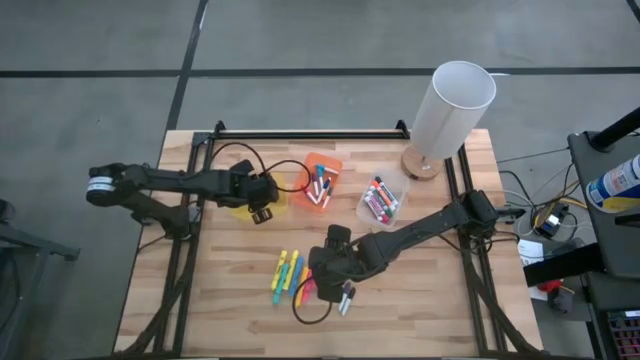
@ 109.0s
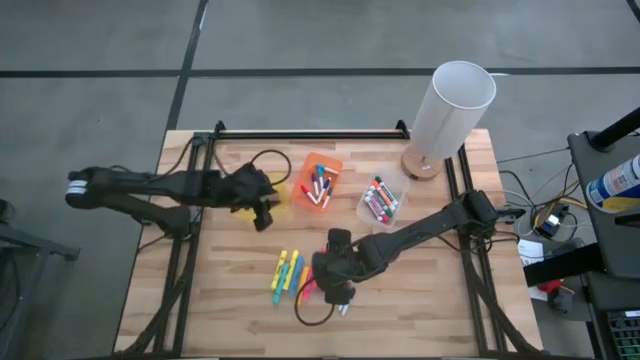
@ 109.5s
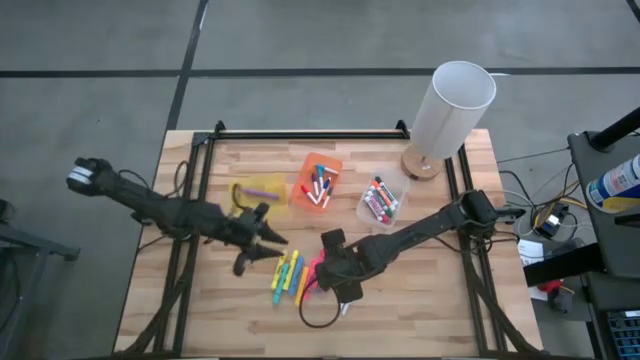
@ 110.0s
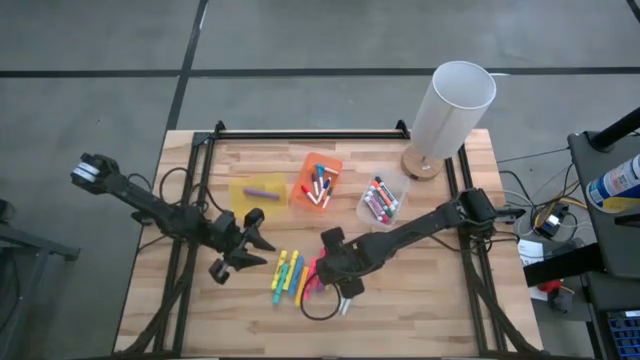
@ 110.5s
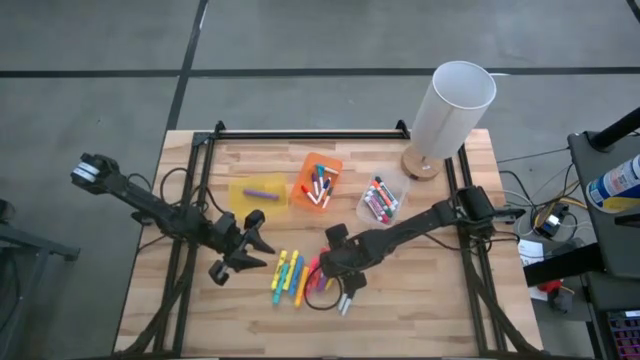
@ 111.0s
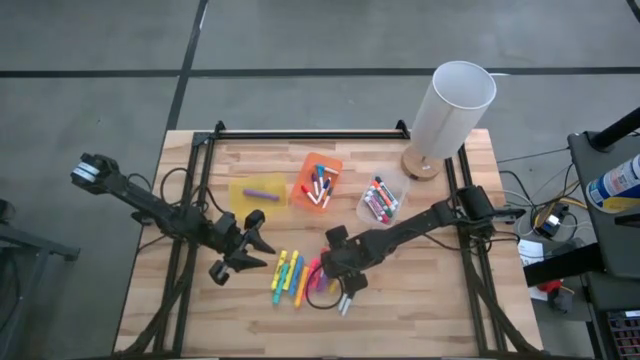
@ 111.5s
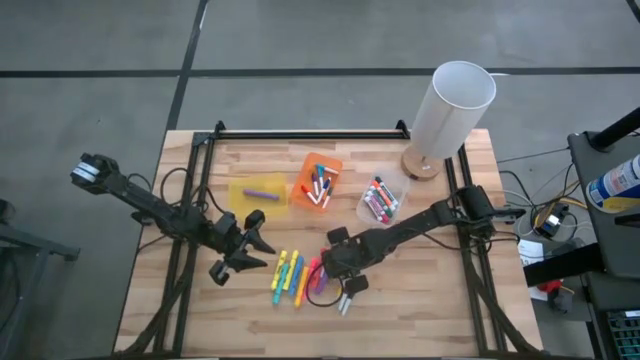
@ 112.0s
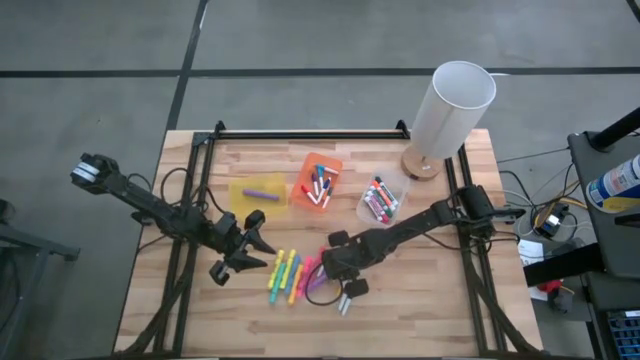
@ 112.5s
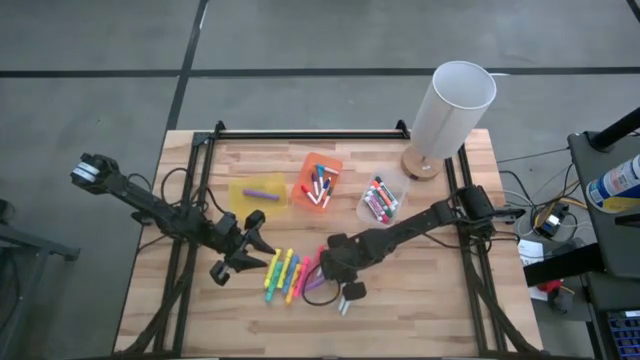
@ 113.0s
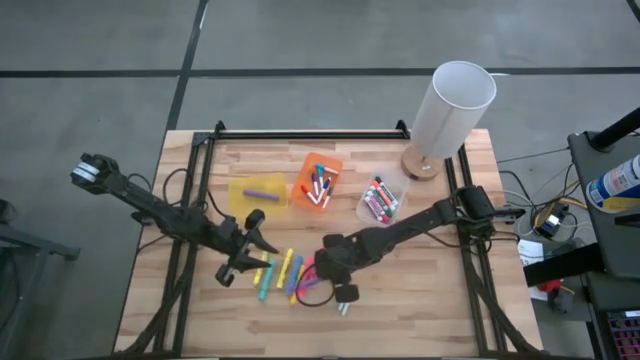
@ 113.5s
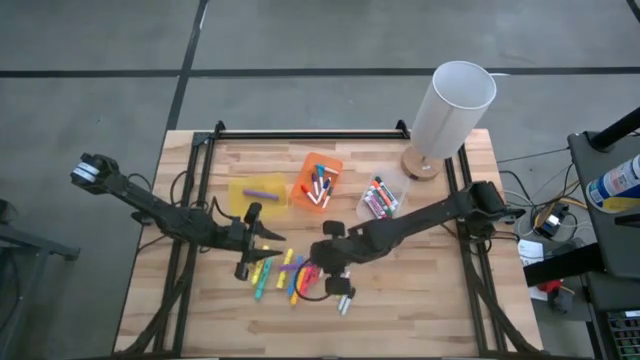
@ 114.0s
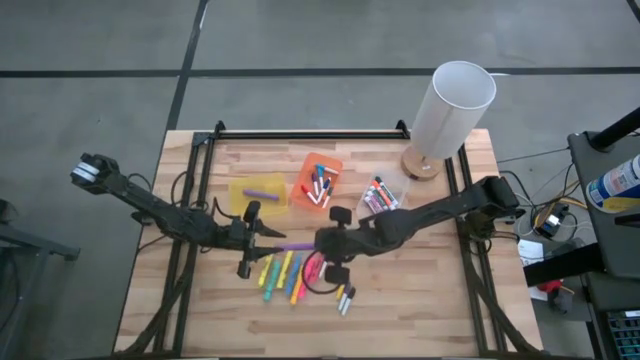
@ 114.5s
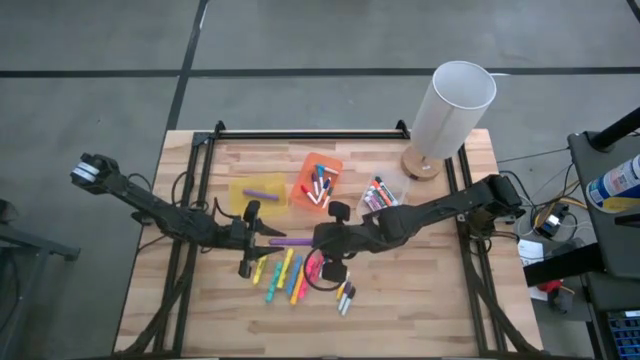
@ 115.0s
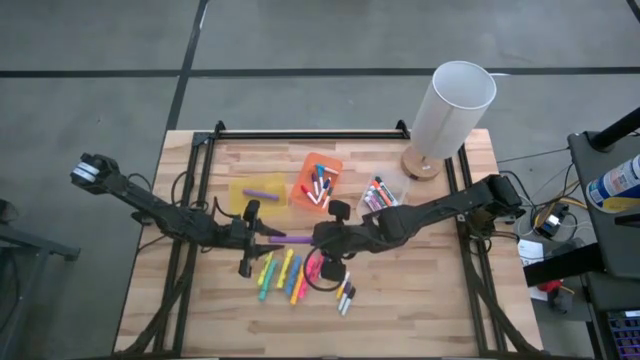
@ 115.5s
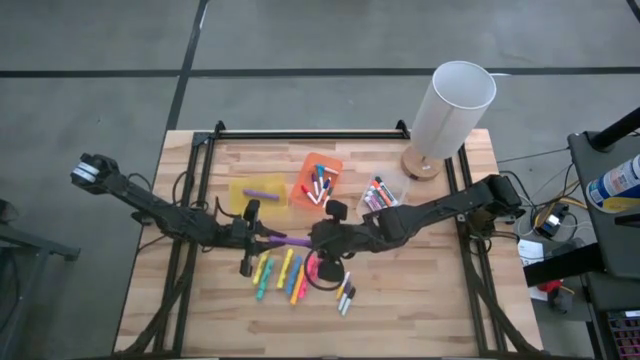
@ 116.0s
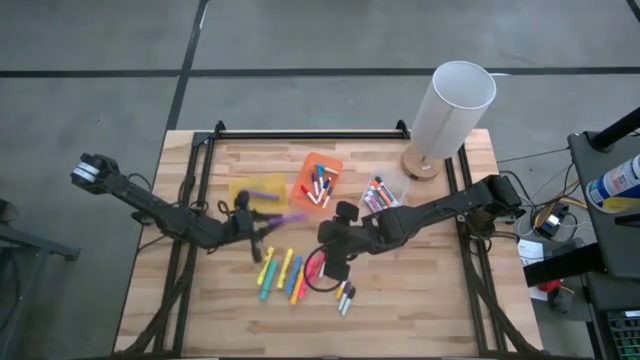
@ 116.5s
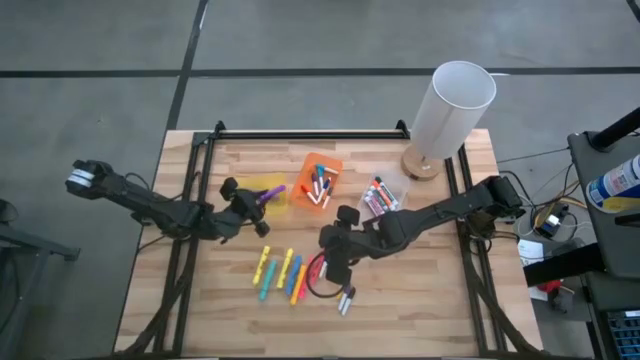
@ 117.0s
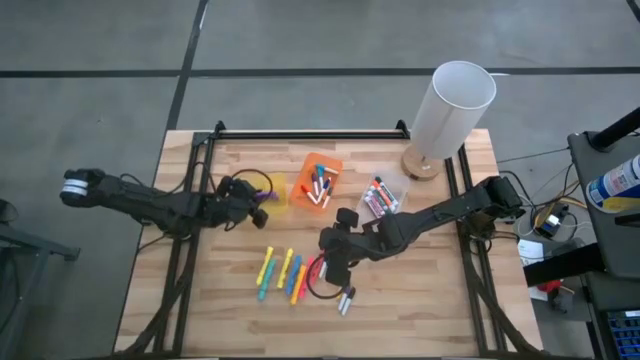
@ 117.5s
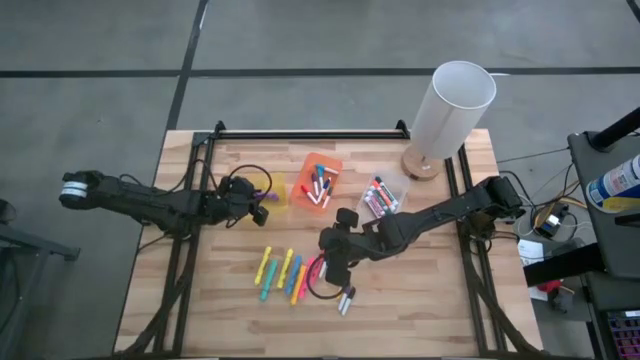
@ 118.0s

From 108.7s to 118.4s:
Task: Pick & Place Markers
Put the violet highlighter pen into the yellow bin

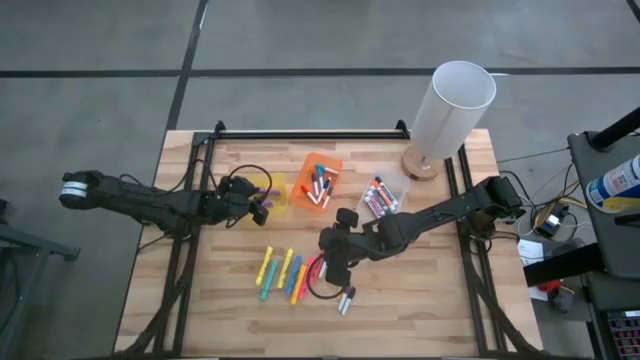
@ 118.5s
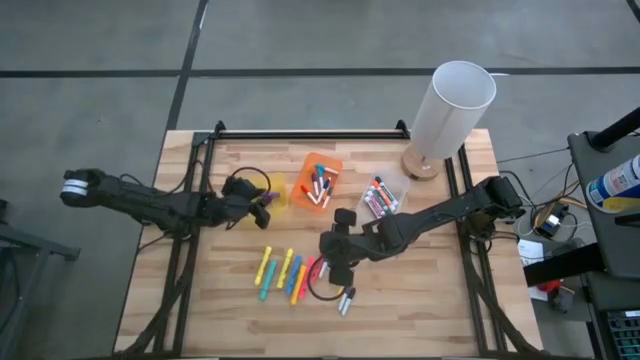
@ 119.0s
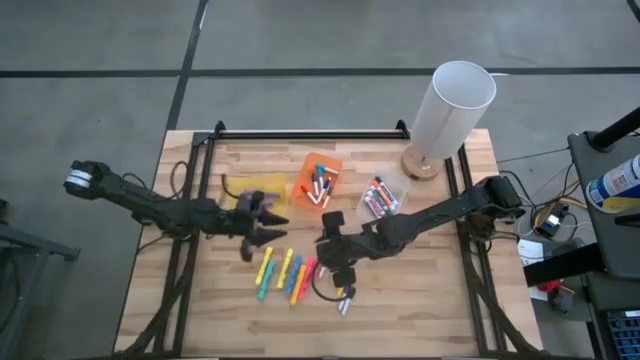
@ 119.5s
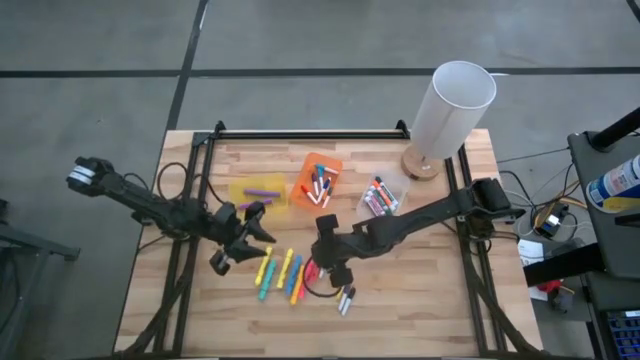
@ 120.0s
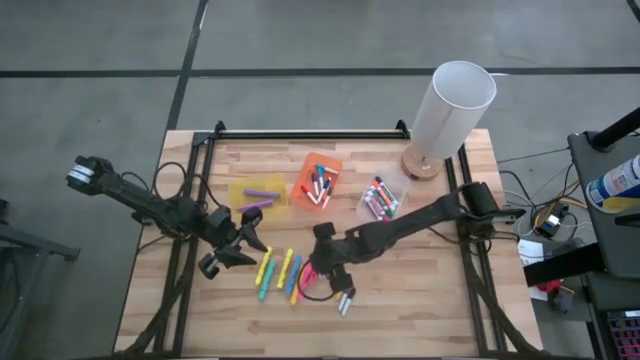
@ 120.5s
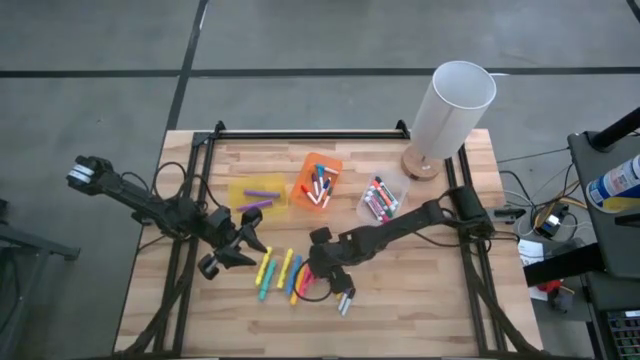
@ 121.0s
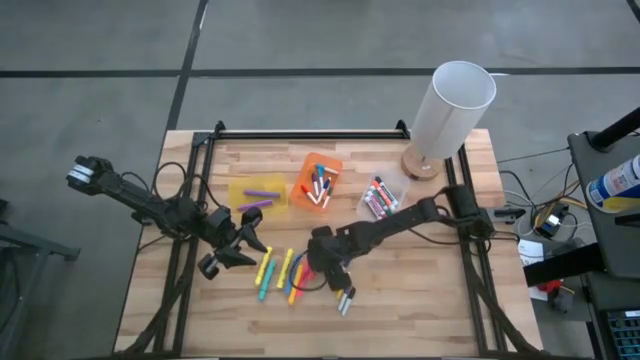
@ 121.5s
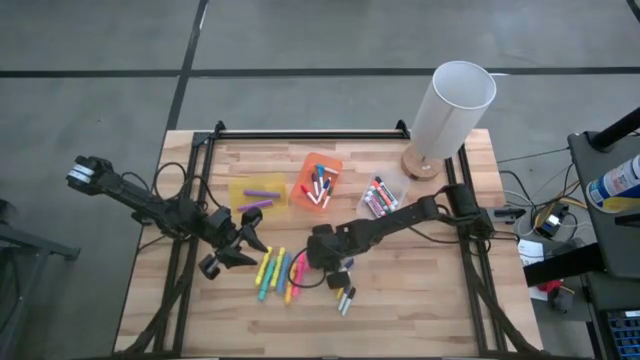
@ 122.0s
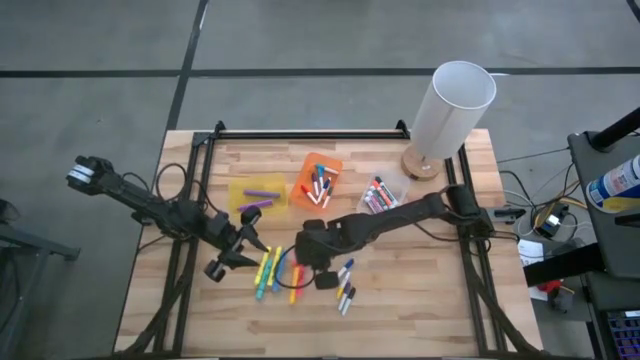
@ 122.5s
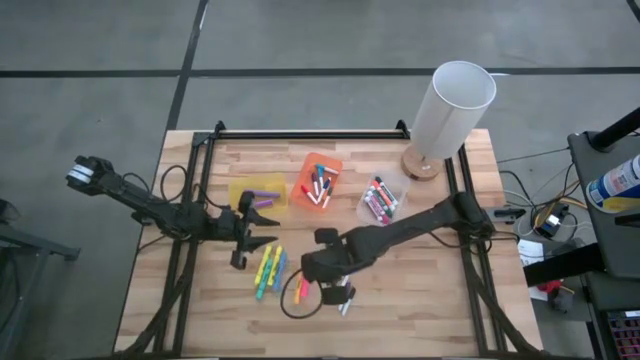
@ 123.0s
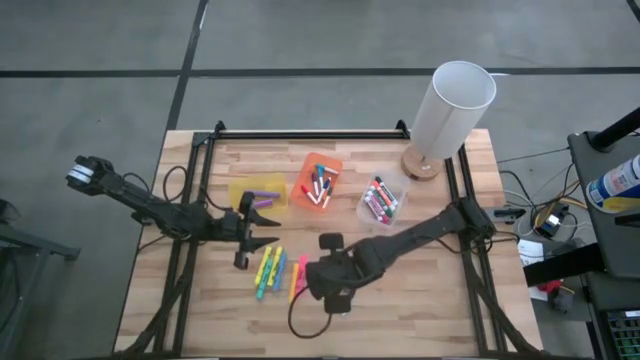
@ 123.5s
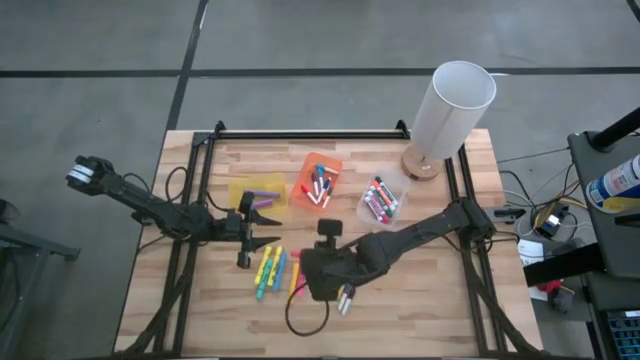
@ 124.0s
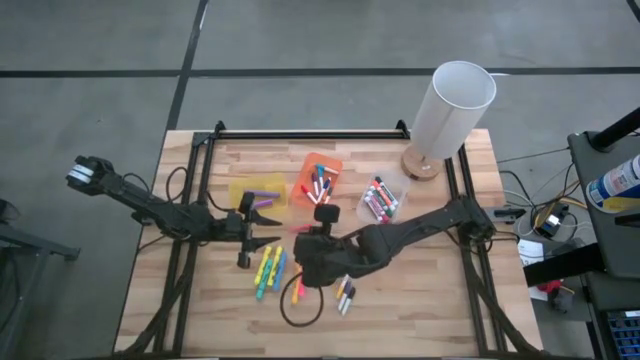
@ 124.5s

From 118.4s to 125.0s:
Put the orange highlighter pen into the yellow bin

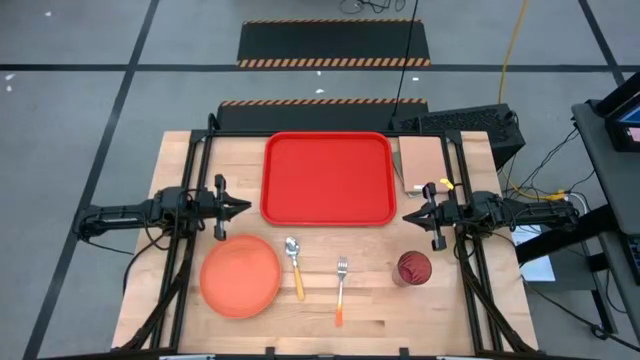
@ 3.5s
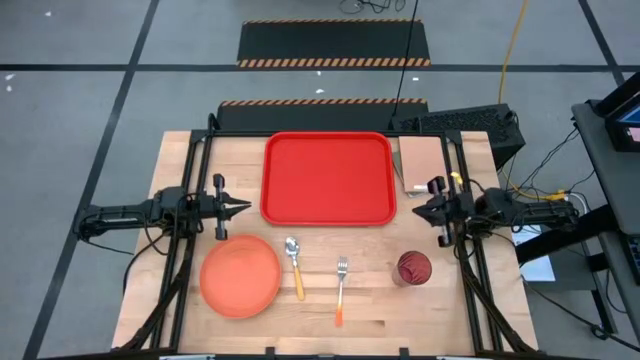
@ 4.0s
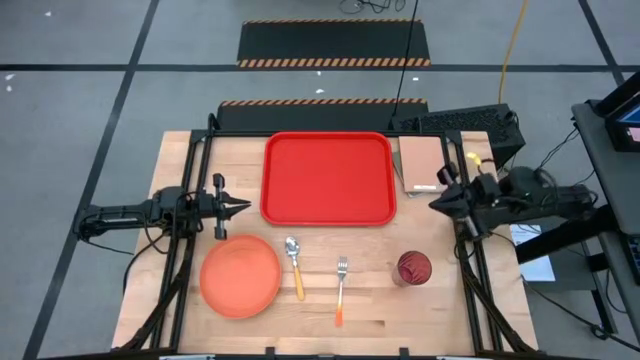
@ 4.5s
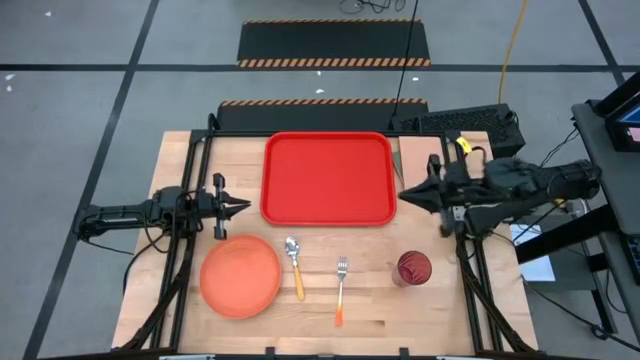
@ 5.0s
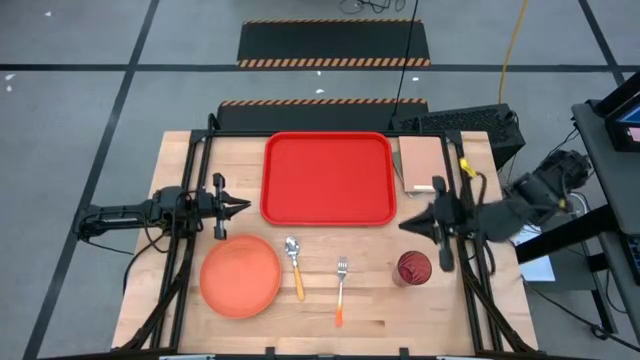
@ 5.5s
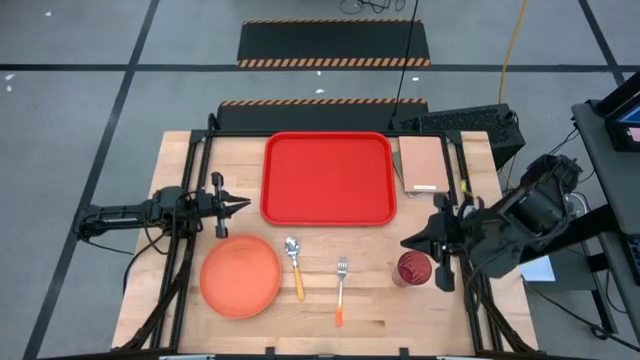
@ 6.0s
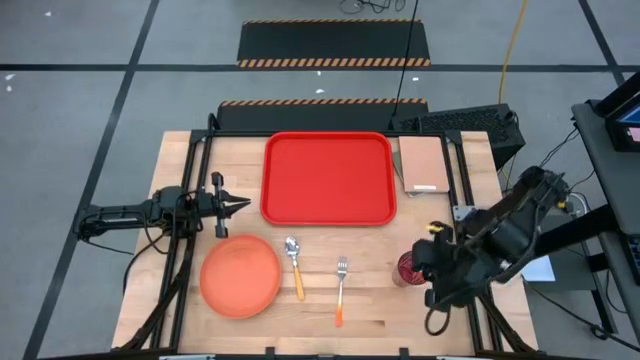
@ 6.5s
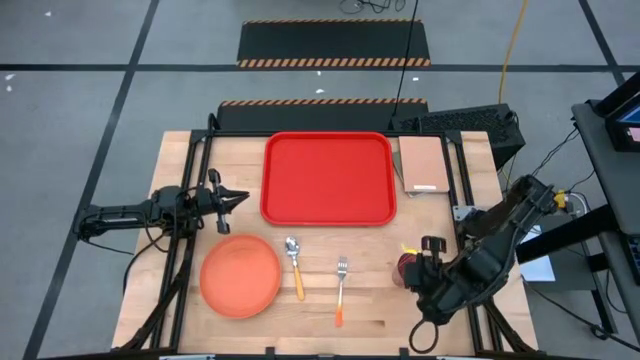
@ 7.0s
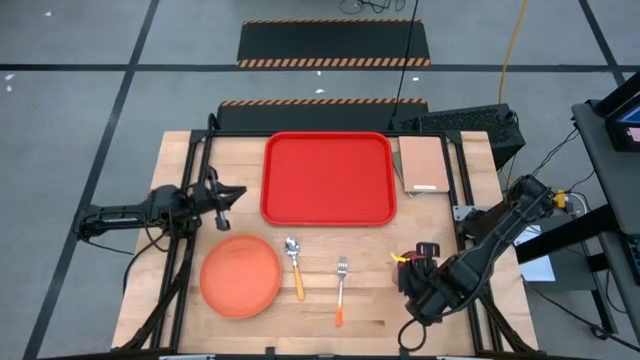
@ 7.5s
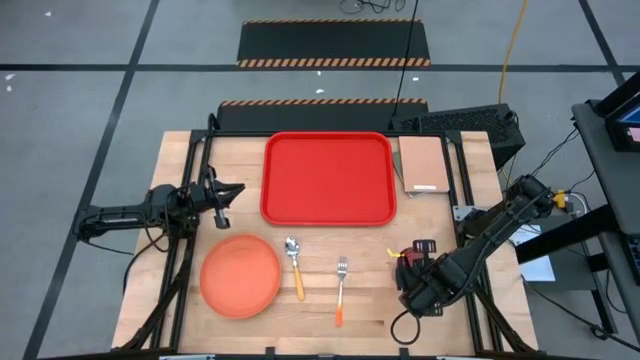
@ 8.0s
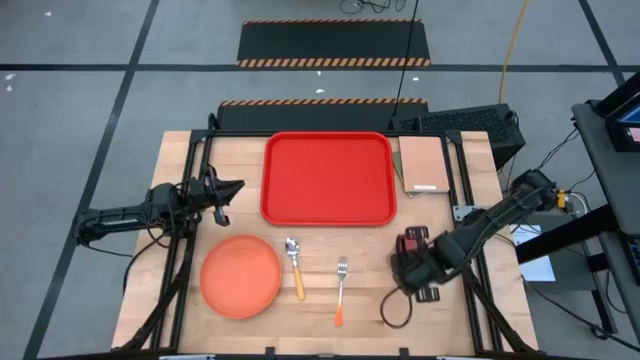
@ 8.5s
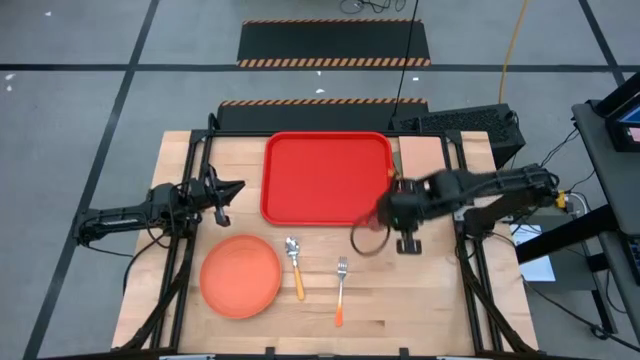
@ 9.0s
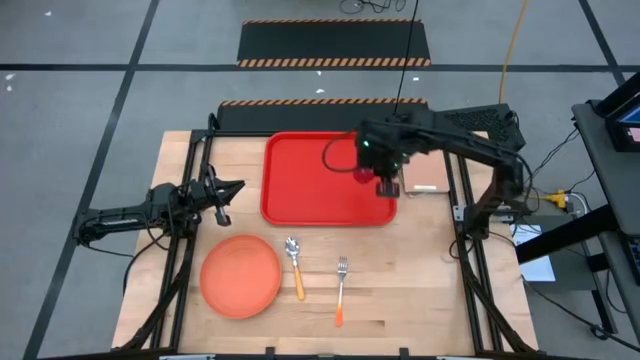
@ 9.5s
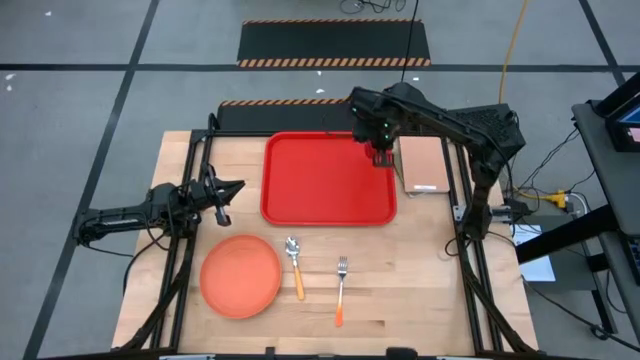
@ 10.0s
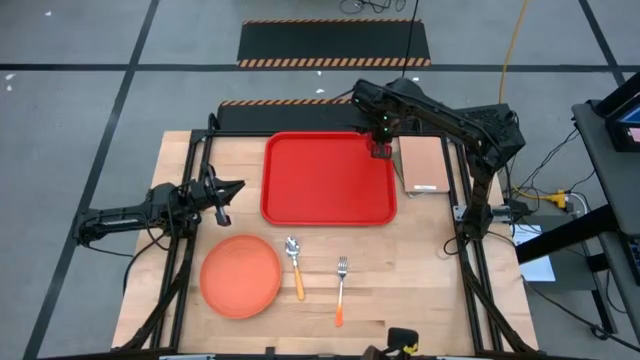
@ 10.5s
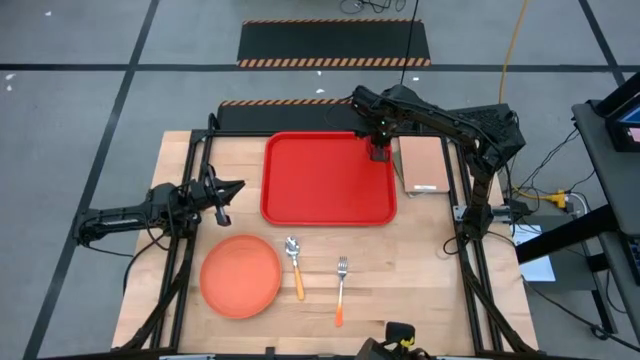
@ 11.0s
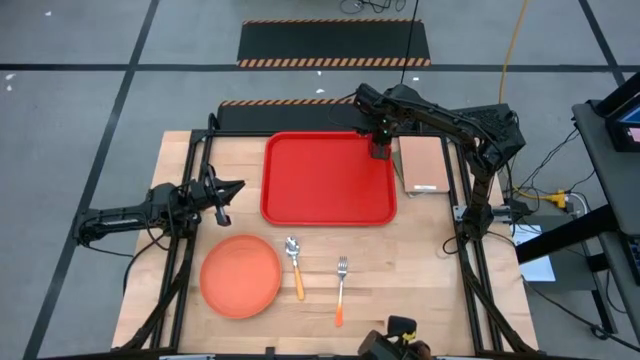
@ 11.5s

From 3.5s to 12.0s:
Task: Pick and place plate/cup/fork/spoon on tray
Put the red glass cup on the red serving tray
